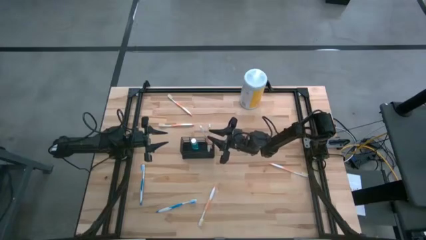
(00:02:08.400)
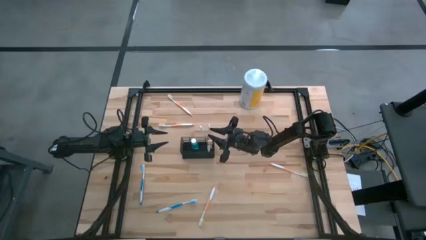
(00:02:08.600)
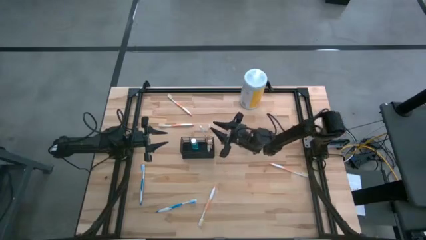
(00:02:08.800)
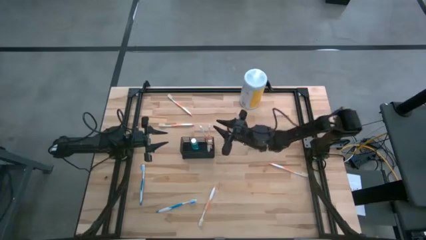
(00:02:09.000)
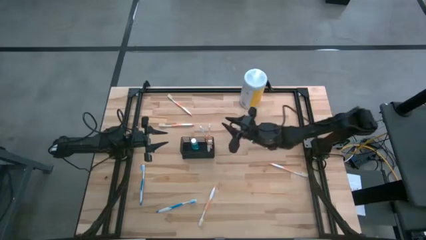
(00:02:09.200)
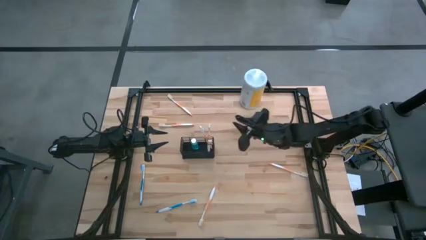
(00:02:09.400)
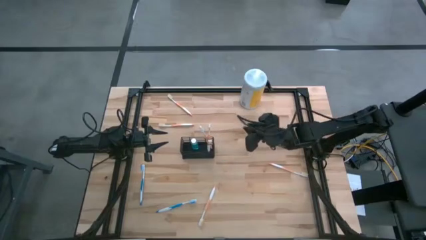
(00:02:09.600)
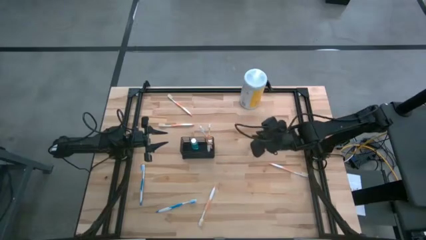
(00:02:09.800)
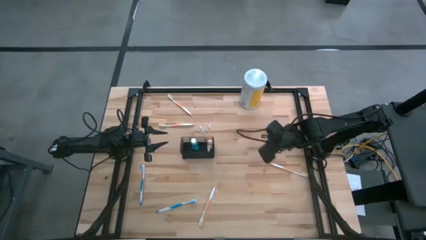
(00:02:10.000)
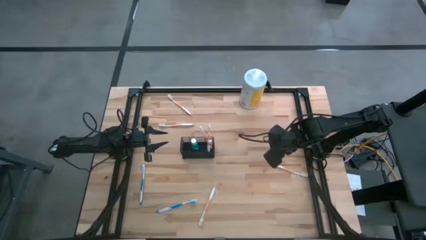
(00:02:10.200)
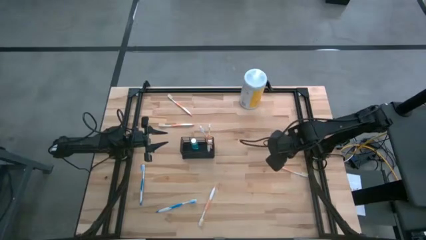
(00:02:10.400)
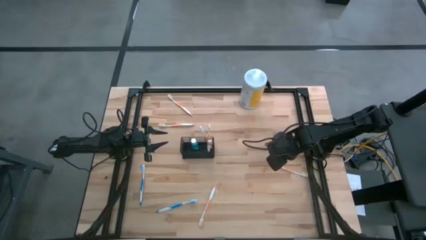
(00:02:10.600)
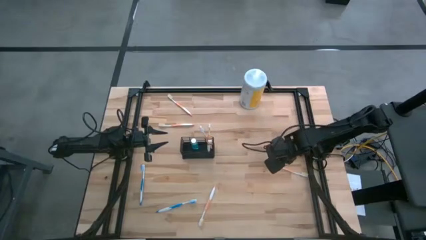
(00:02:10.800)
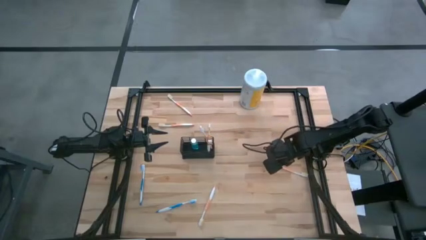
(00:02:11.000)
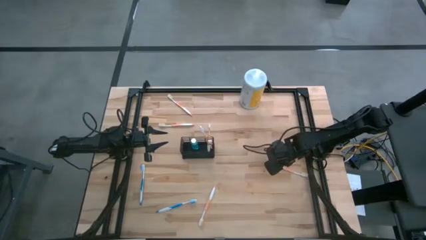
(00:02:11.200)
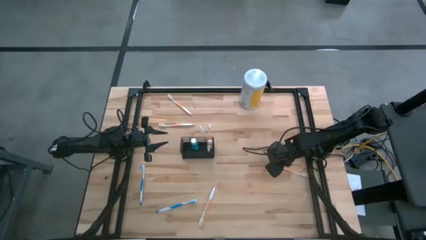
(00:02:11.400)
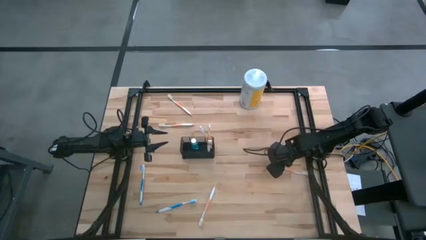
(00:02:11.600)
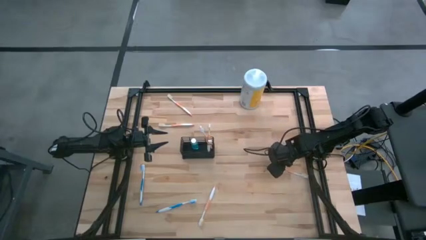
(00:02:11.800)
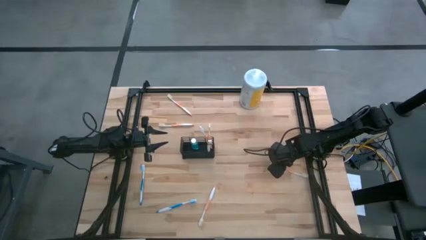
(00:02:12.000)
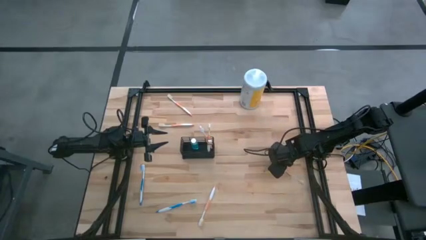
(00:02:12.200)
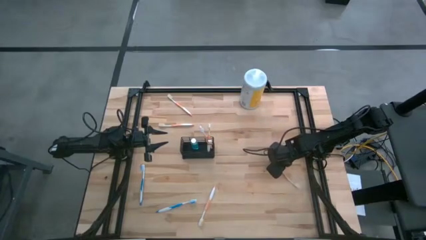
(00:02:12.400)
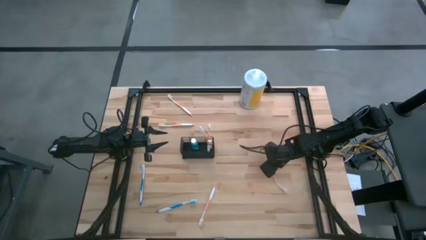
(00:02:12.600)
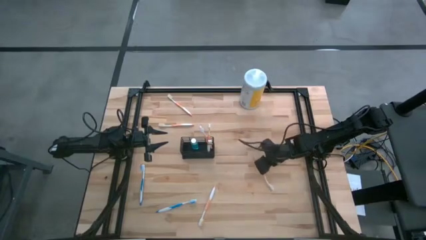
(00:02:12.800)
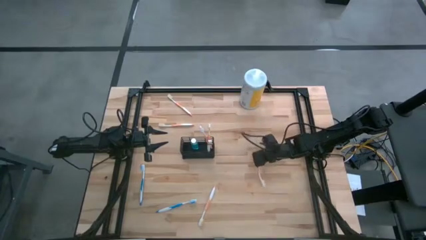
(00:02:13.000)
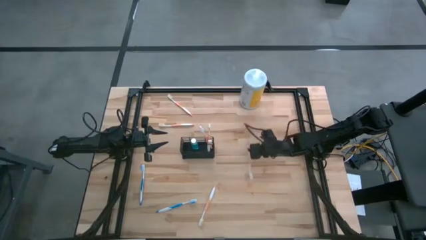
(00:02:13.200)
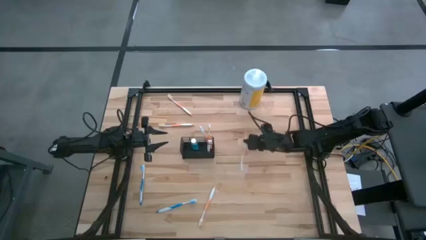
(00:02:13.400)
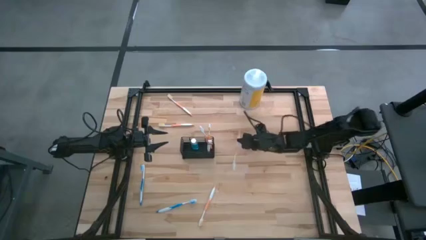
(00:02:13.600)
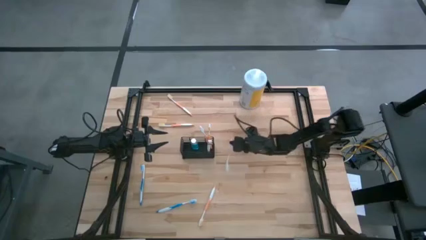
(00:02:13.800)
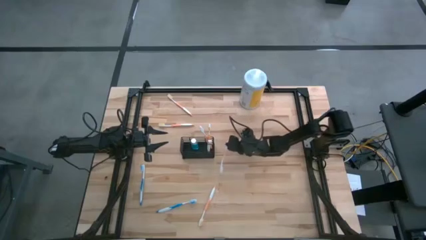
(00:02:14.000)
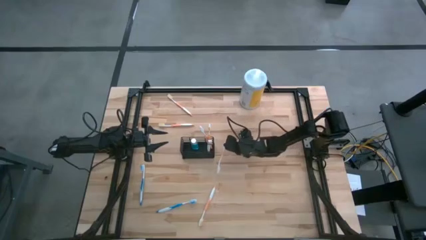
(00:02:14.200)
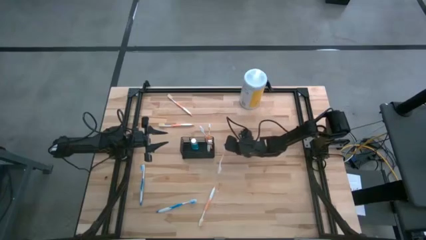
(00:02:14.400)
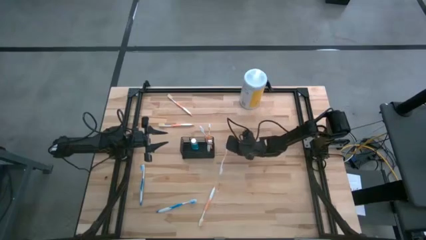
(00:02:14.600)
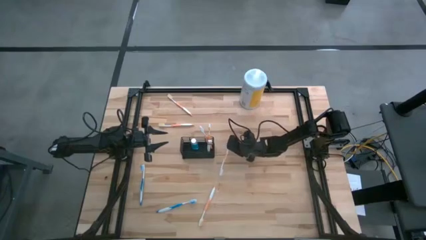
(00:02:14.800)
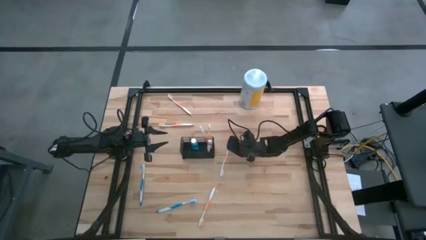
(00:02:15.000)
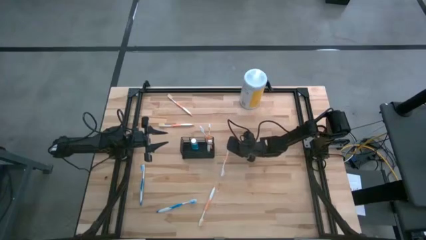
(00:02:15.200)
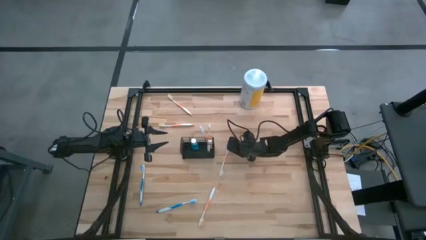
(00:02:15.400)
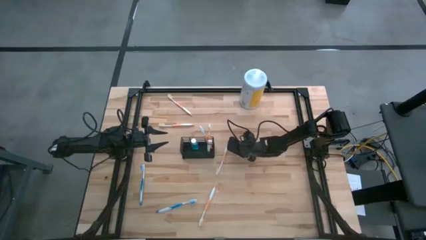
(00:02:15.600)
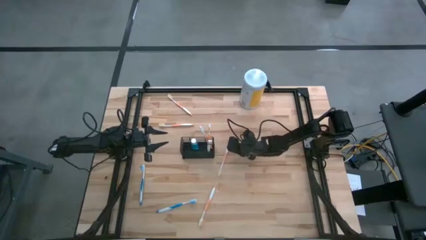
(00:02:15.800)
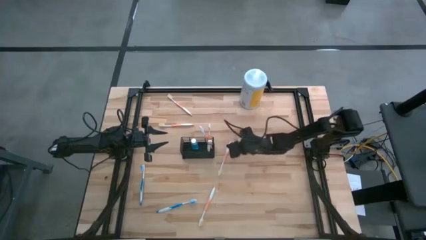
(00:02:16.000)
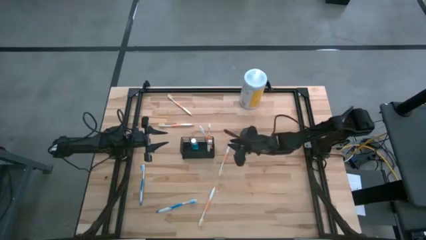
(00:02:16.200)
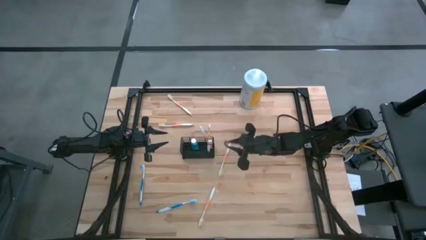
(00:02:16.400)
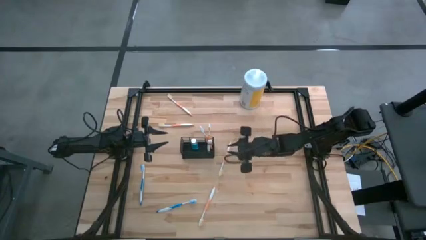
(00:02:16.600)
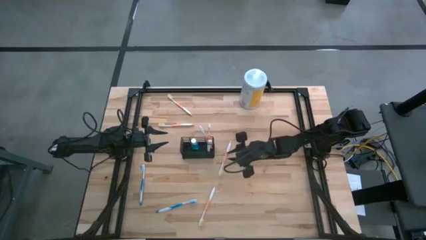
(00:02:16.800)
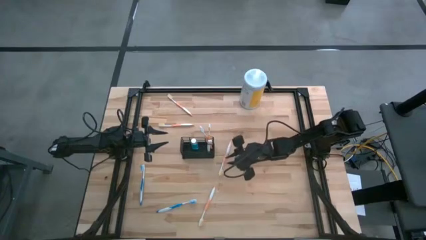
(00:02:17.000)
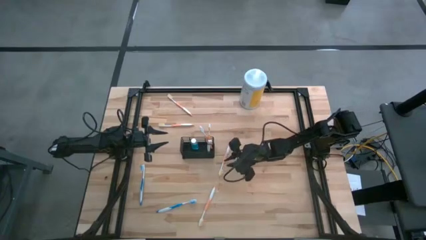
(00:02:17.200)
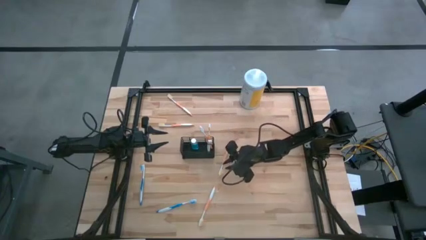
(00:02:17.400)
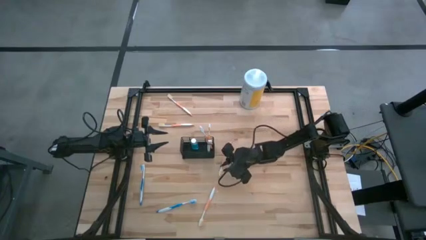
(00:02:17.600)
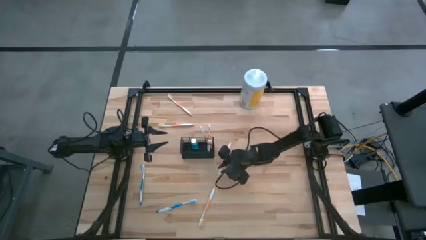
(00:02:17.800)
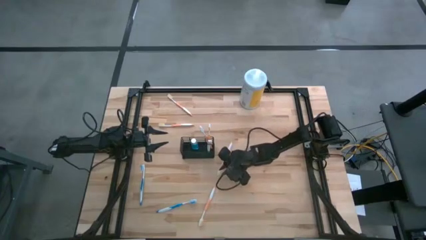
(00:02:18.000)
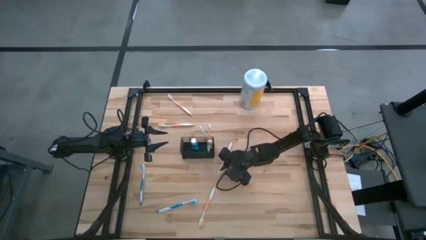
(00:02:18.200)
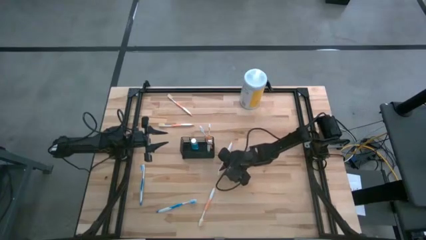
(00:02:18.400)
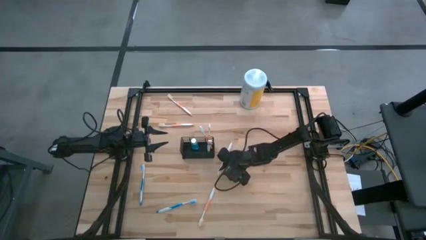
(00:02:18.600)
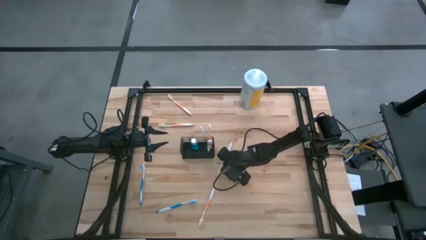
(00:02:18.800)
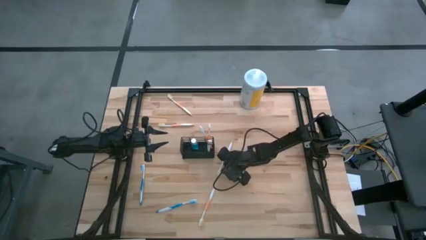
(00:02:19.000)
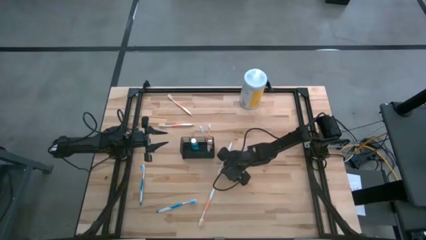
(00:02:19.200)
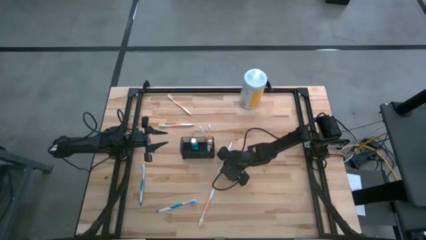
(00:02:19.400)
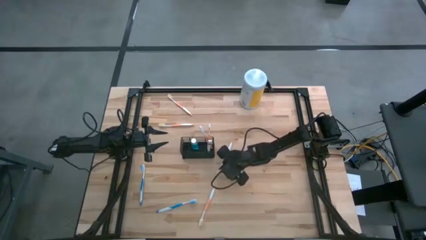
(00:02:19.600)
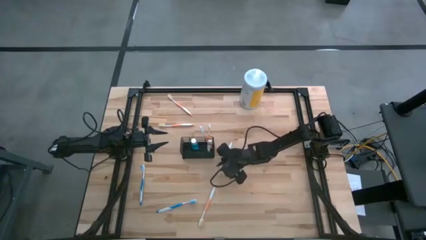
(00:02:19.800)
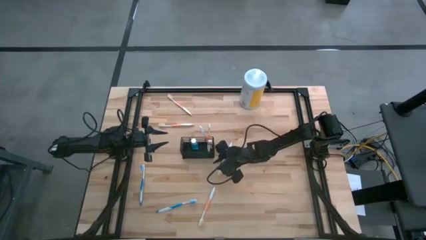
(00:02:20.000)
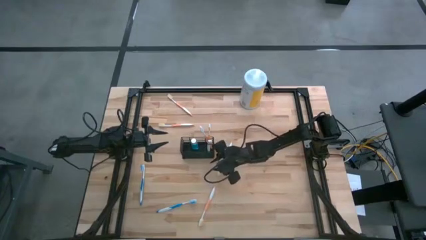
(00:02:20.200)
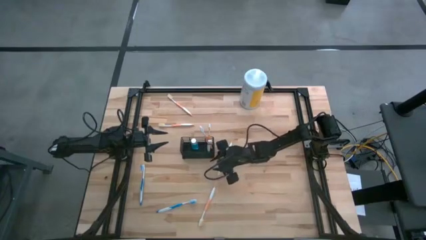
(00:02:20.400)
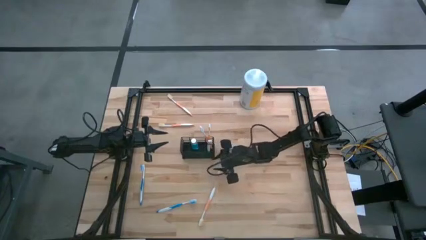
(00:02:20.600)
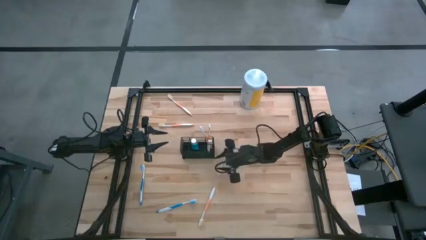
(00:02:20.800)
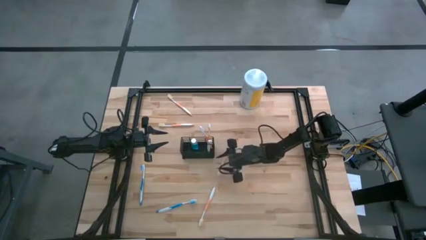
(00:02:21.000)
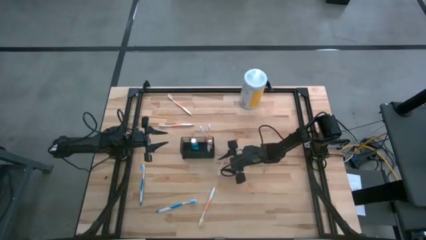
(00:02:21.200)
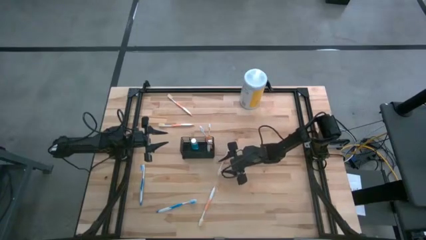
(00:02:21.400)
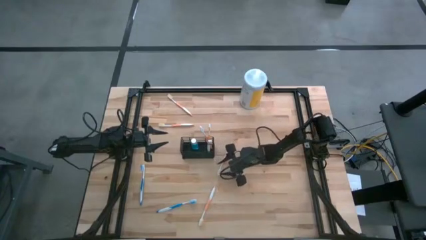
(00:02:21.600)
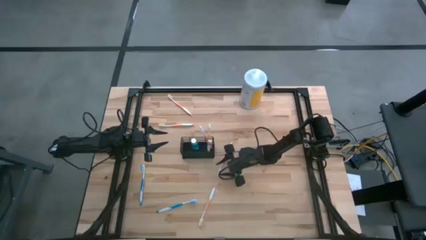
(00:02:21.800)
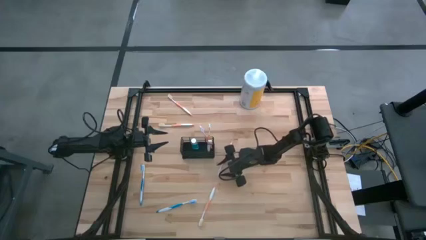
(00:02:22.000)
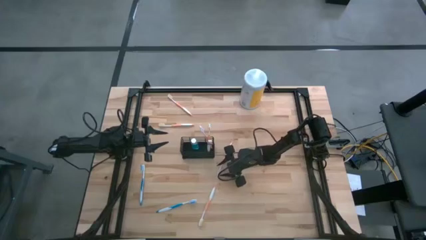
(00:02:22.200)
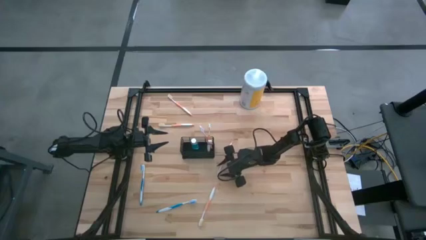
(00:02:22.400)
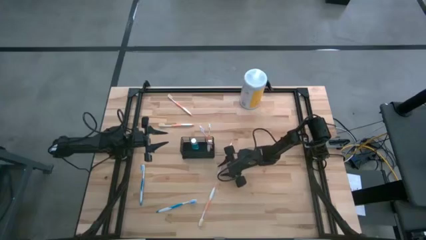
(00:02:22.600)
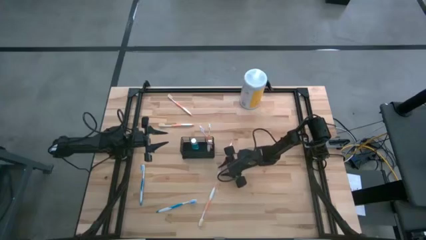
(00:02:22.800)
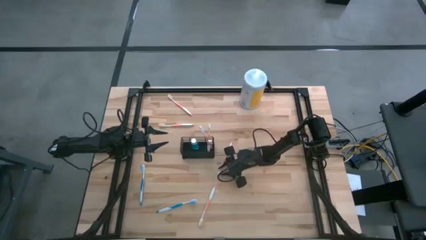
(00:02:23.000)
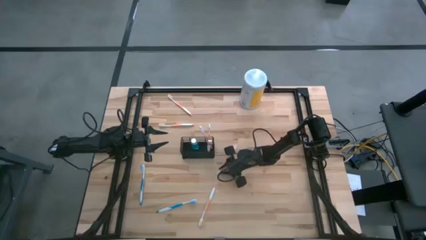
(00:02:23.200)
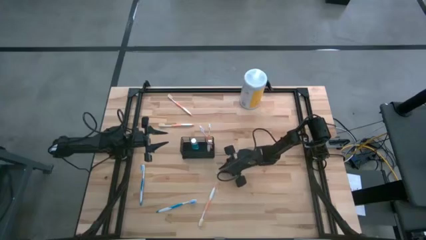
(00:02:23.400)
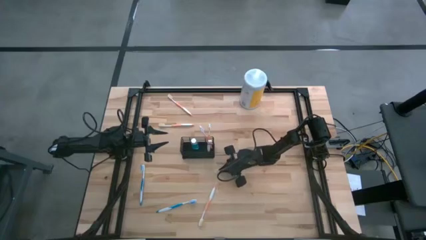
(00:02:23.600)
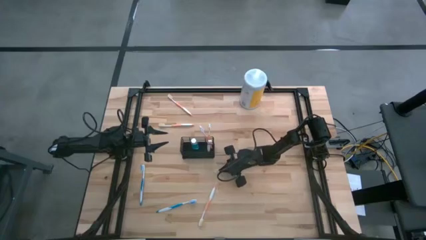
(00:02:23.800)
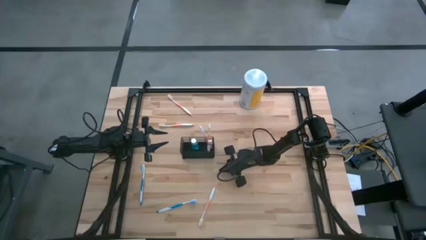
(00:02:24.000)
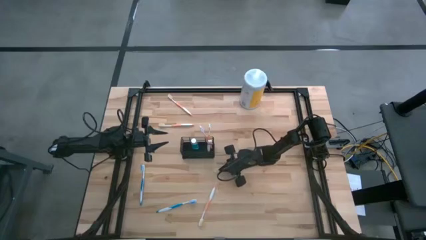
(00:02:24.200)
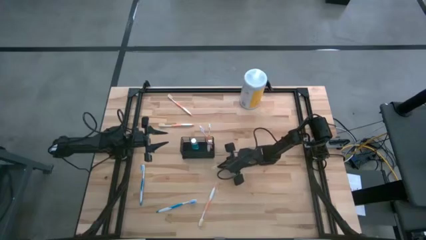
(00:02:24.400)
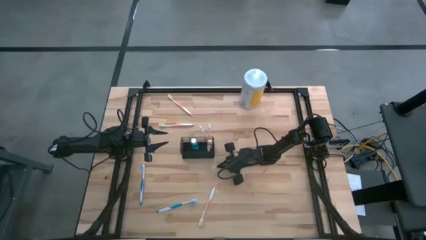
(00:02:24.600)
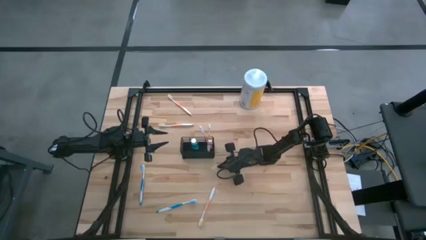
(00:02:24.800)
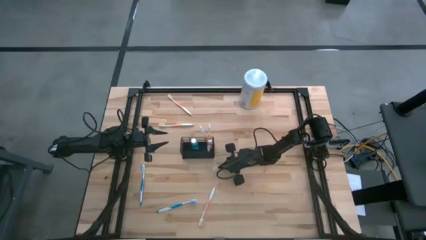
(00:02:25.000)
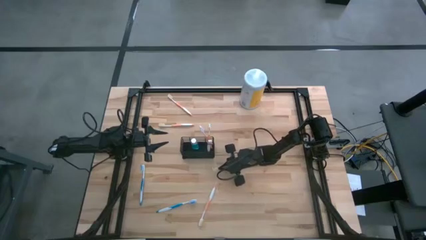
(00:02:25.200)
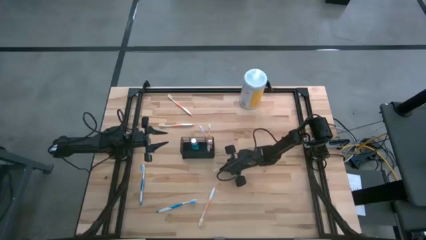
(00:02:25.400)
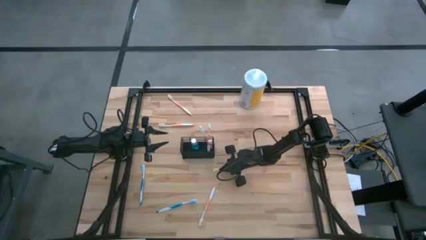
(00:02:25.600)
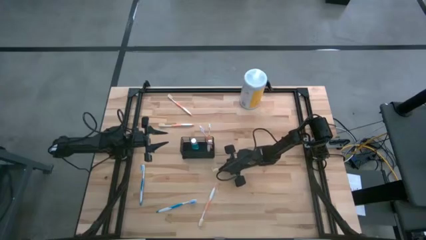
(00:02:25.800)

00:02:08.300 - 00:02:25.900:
Task: Pick & Place toothbrushing station
Put the orange toothbrush into the right section of the wire organizer
